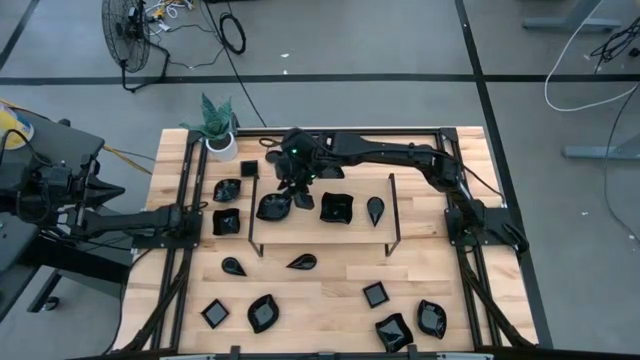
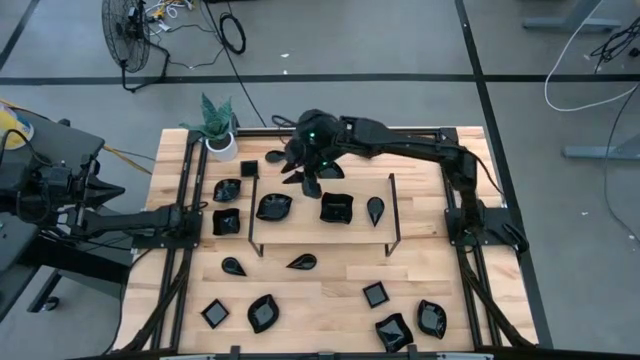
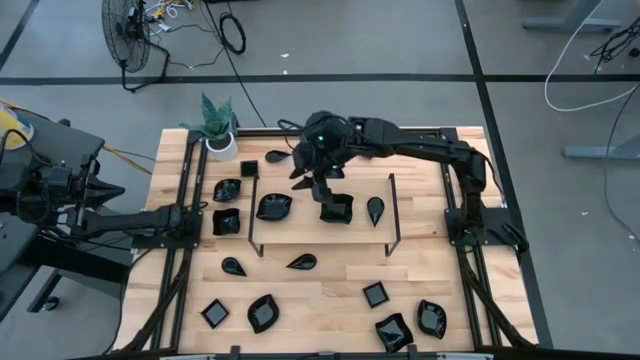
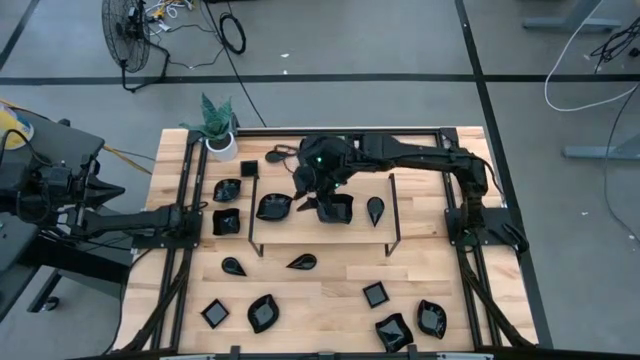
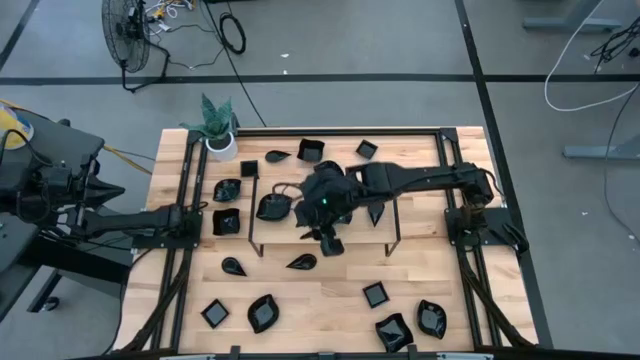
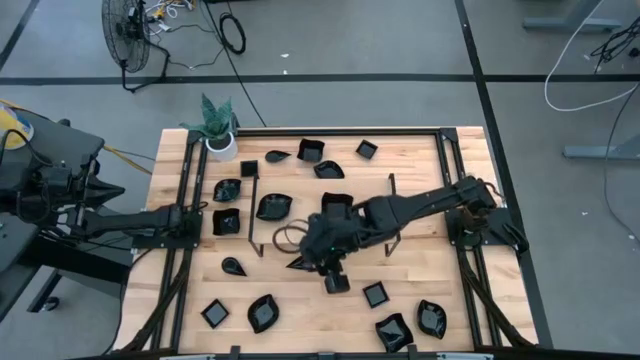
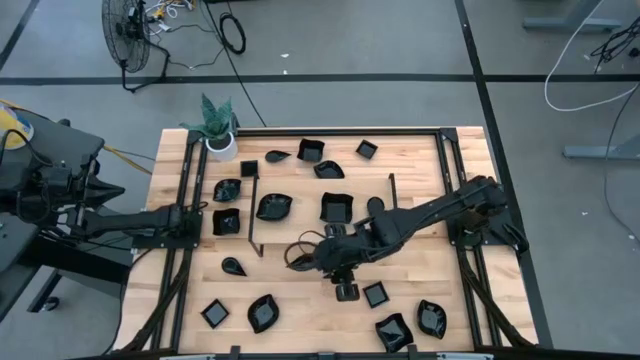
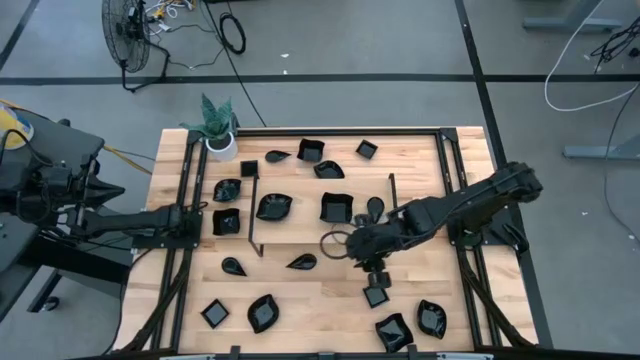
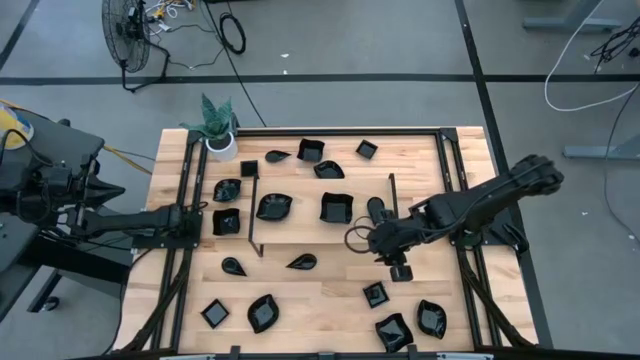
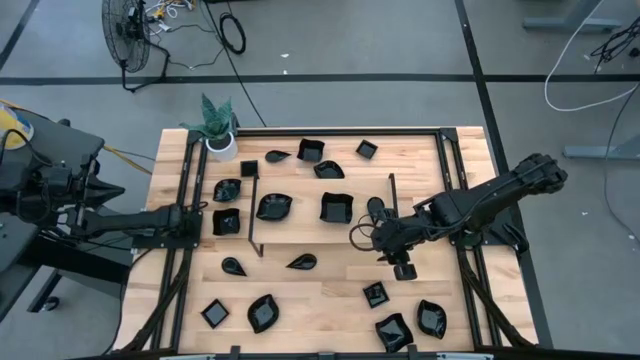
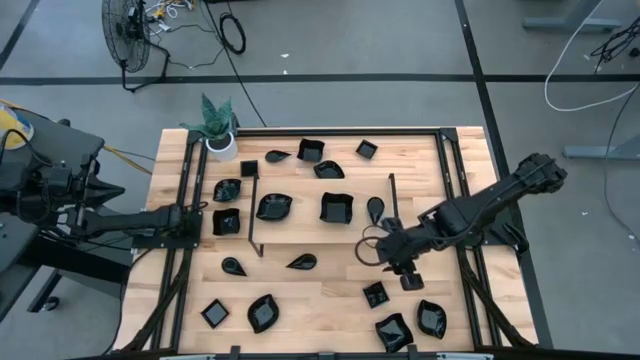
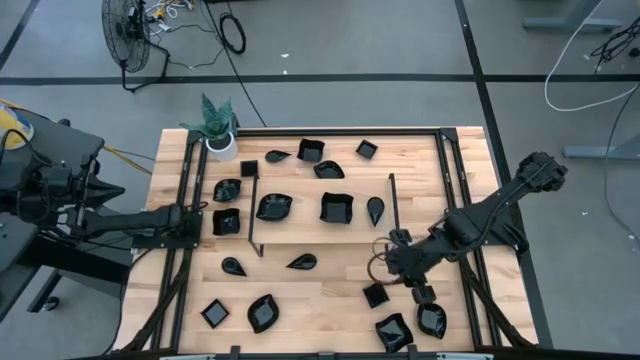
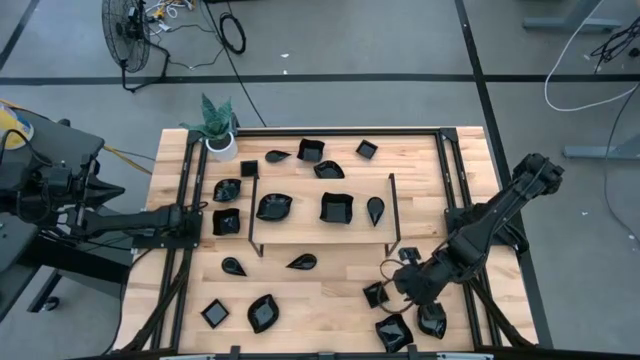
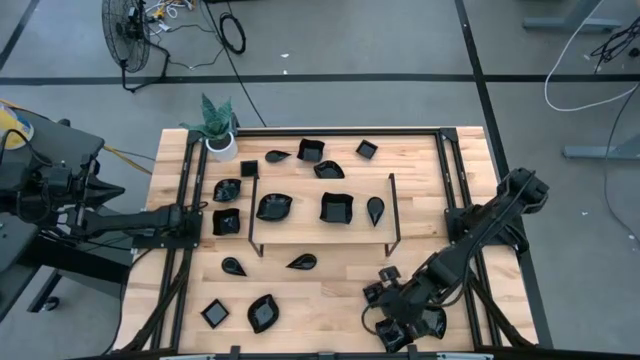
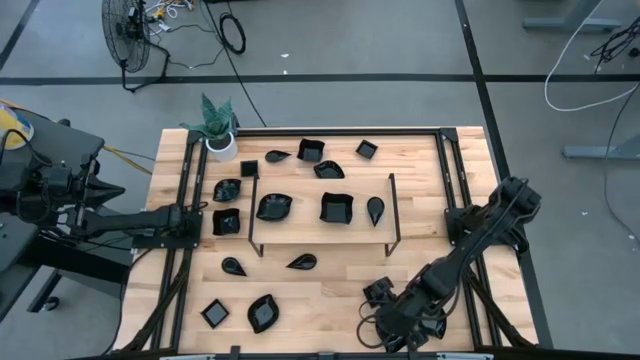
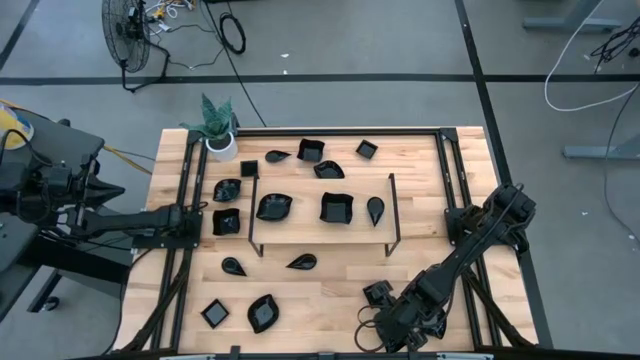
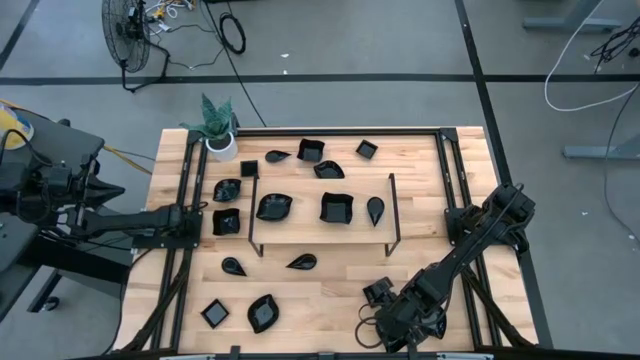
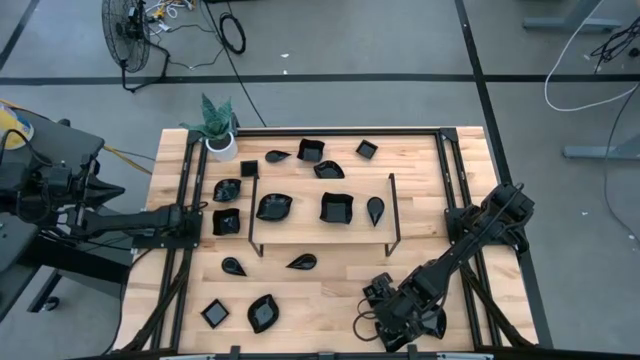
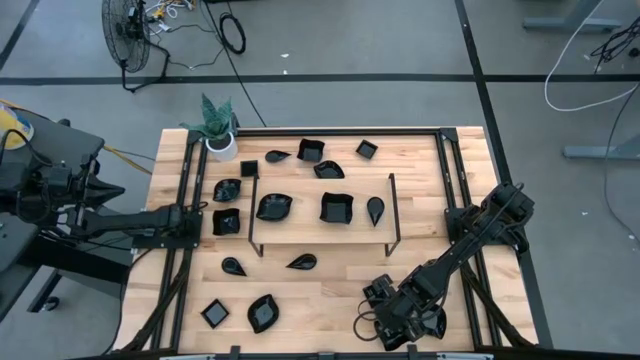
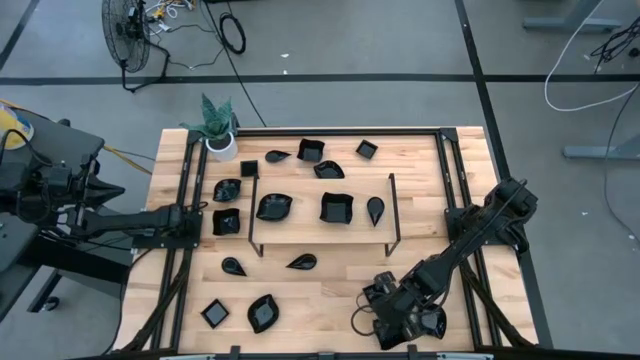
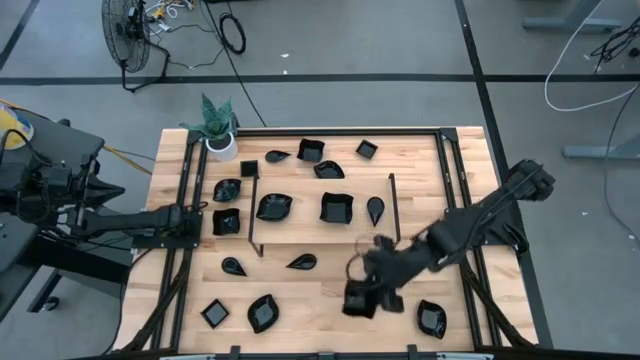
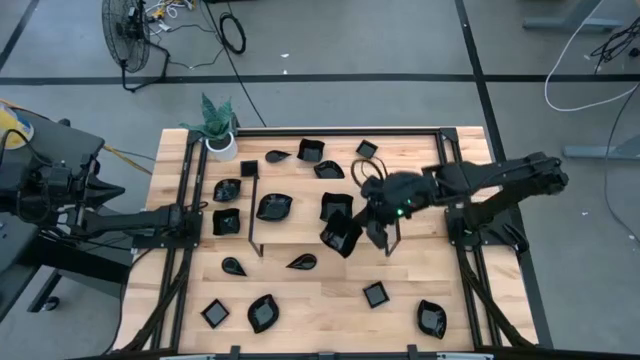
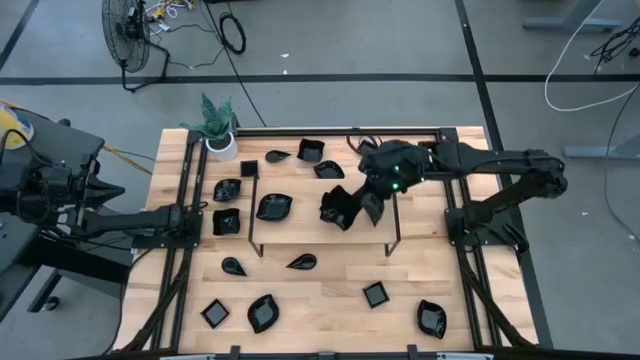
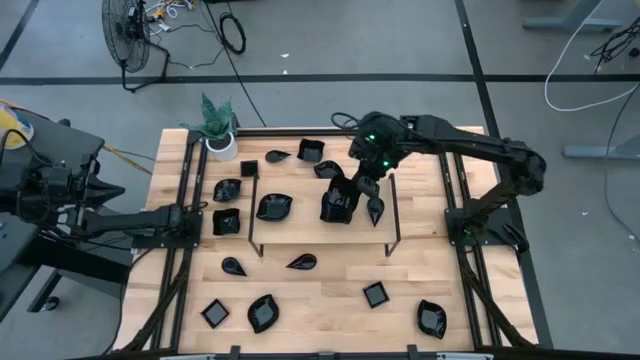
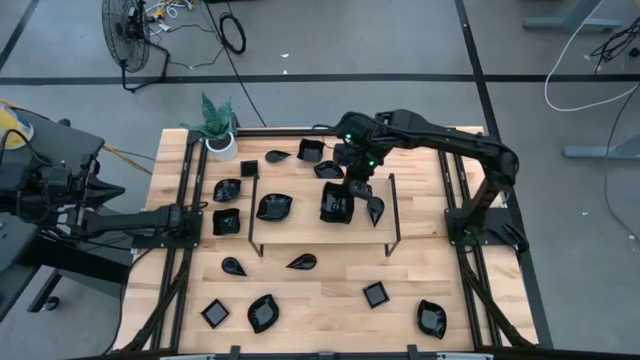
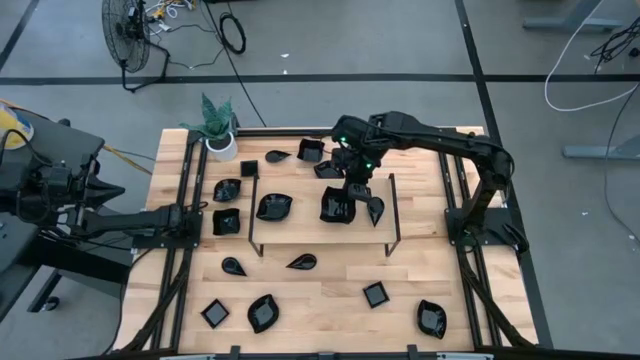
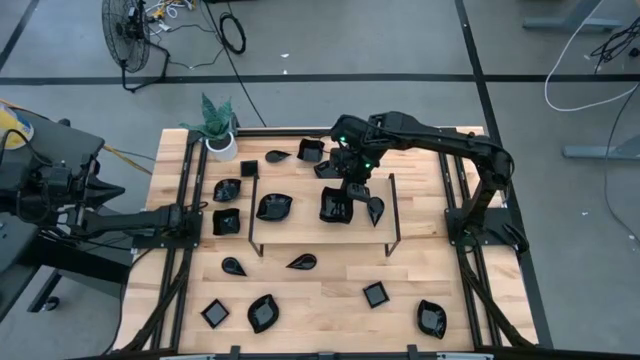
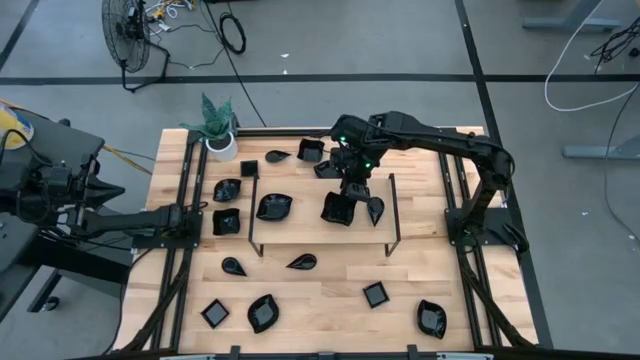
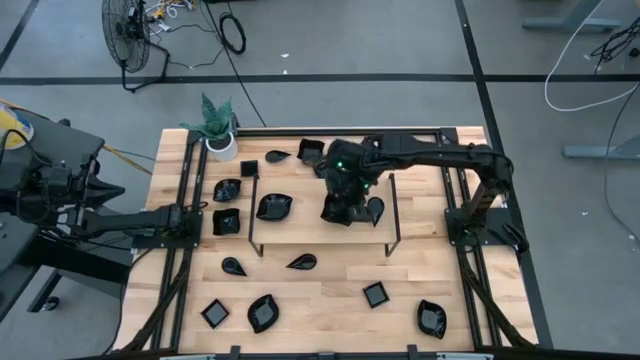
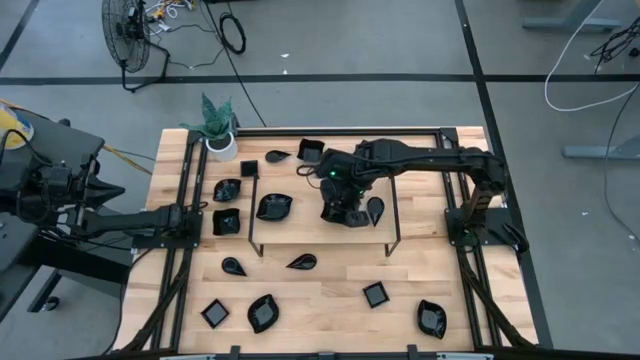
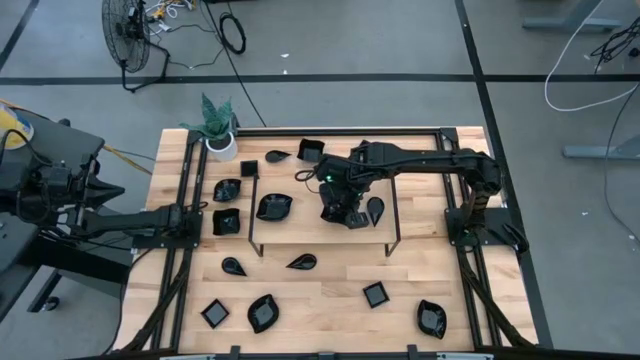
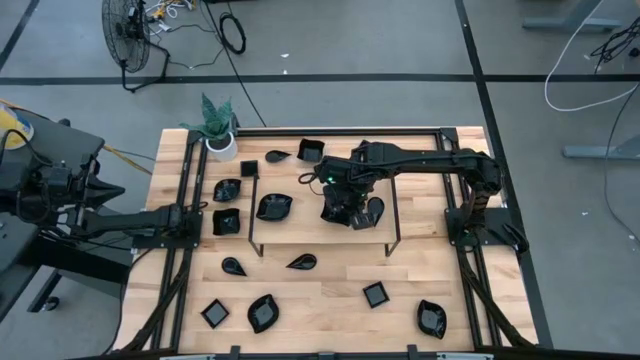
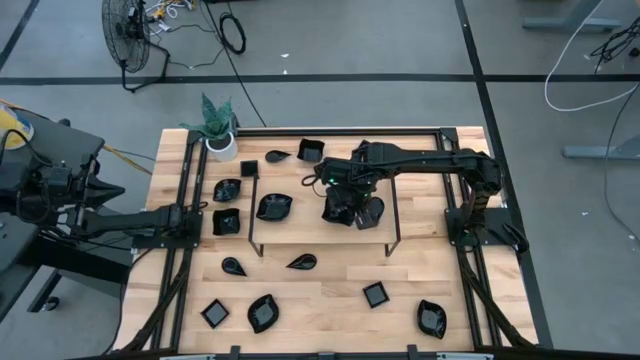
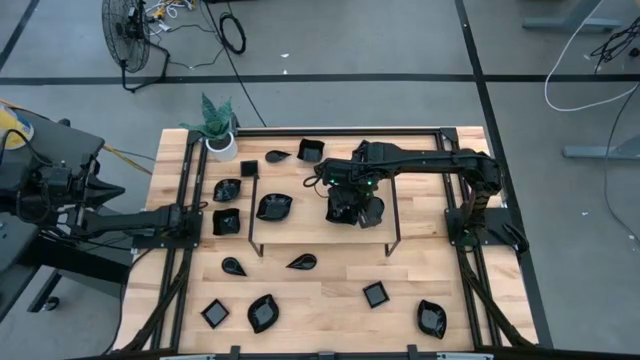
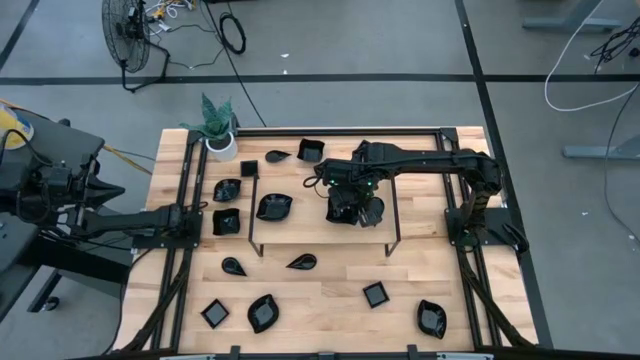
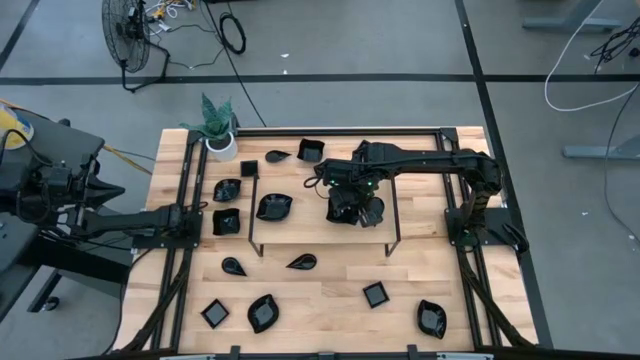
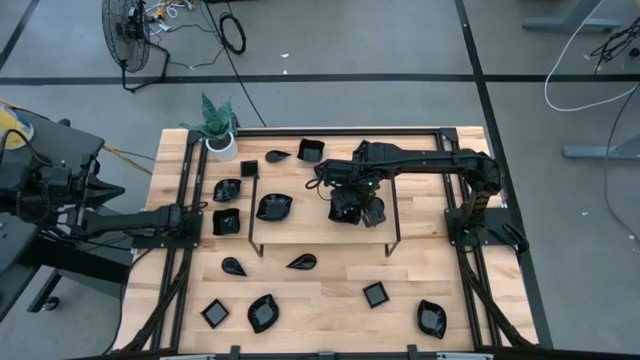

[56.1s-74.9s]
Task: Pick & Place Mini shaped plates
Stack the distorted square plate on top of the distorted square plate on the shelf

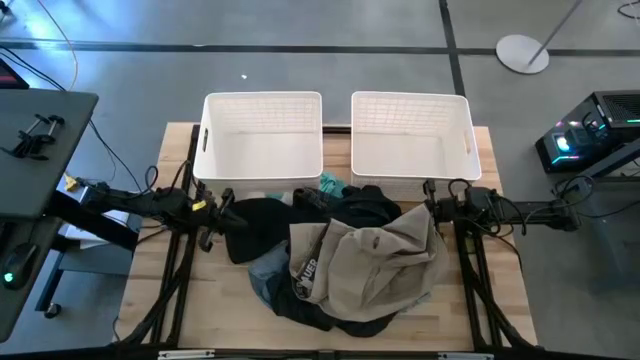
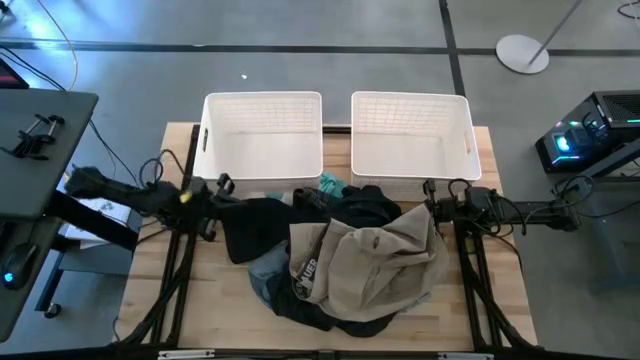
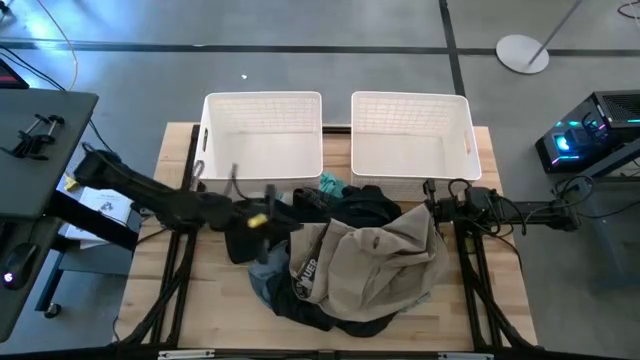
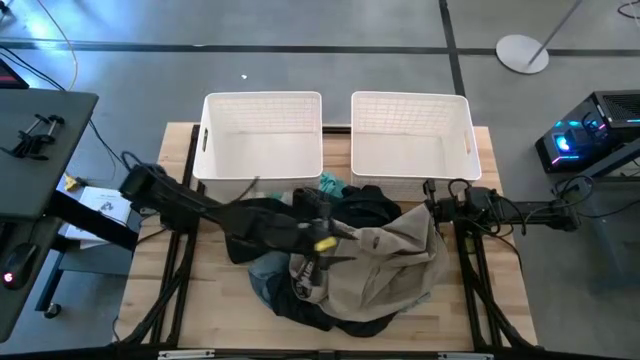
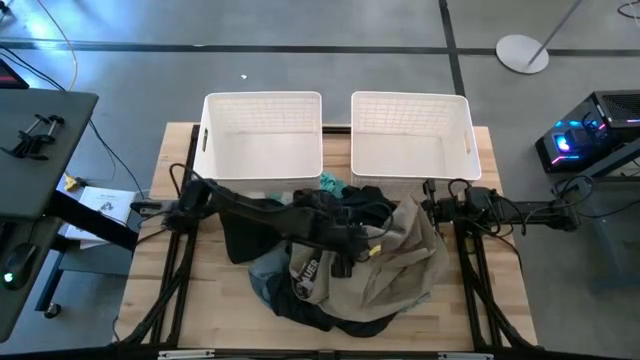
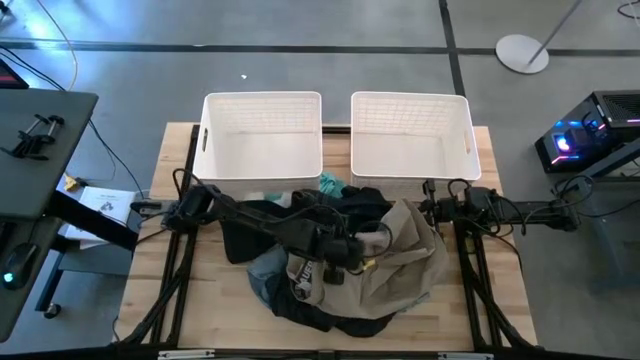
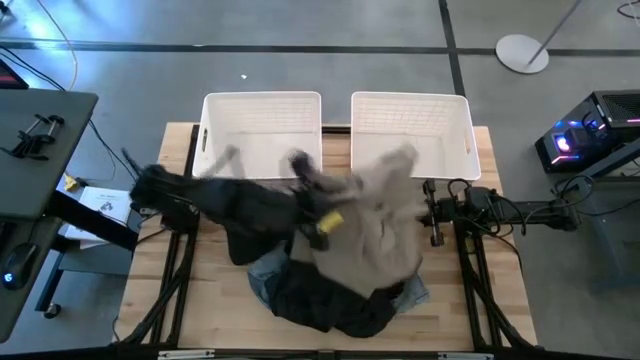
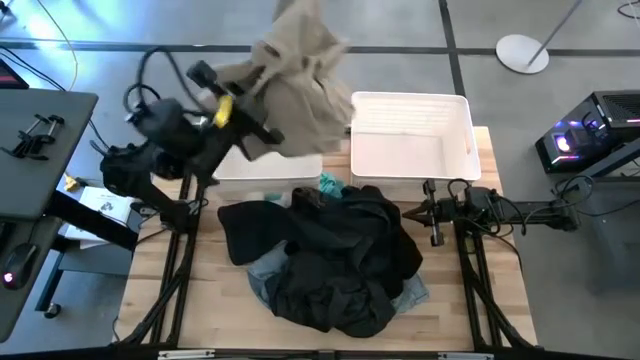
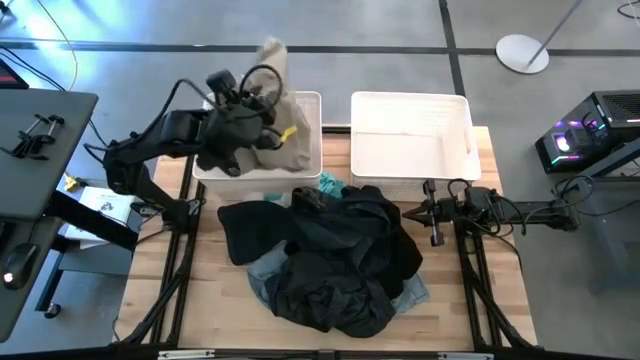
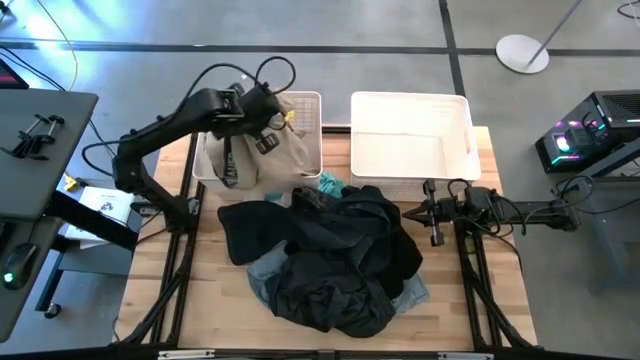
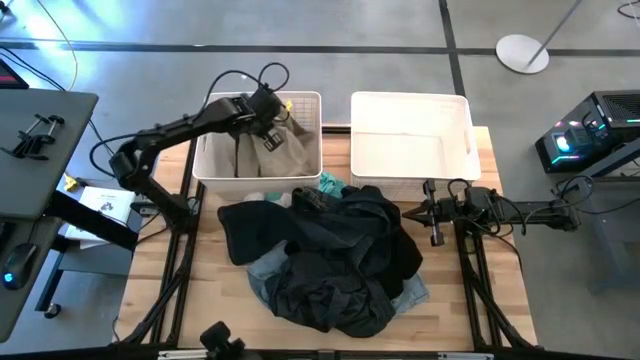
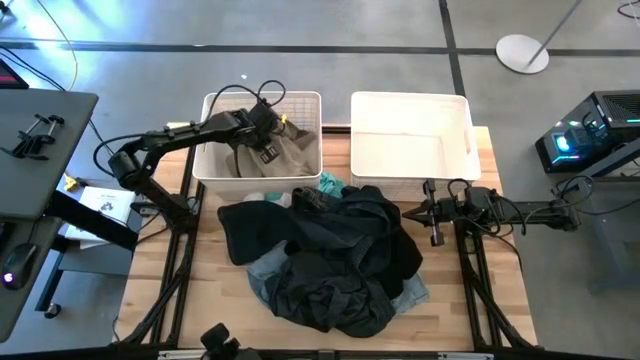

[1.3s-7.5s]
Task: Sort clothes
Put the brown shorts into the left white laundry bin
